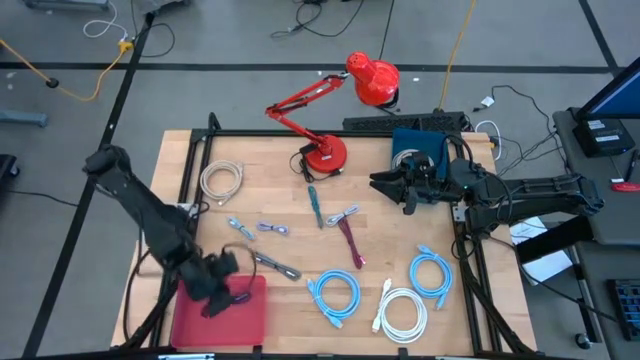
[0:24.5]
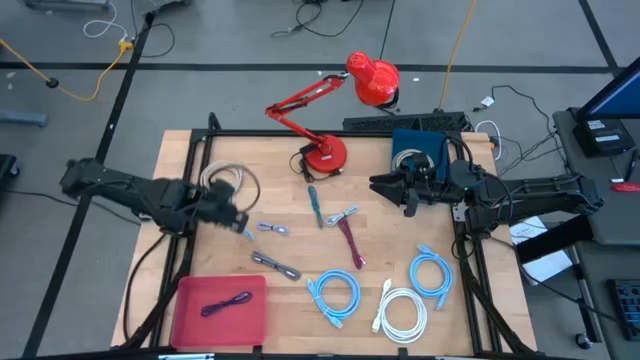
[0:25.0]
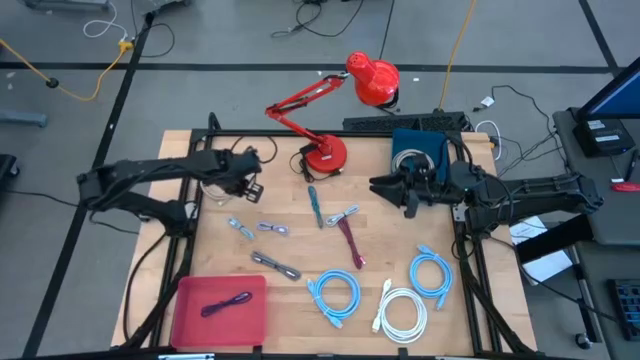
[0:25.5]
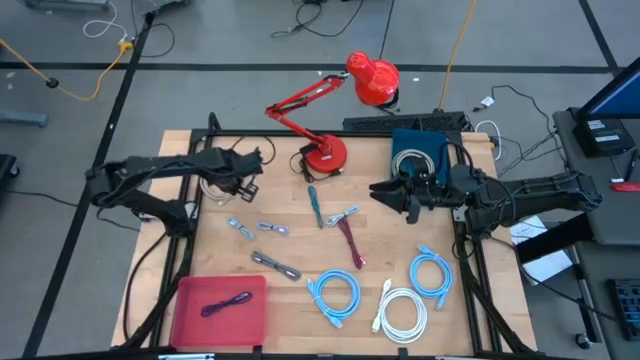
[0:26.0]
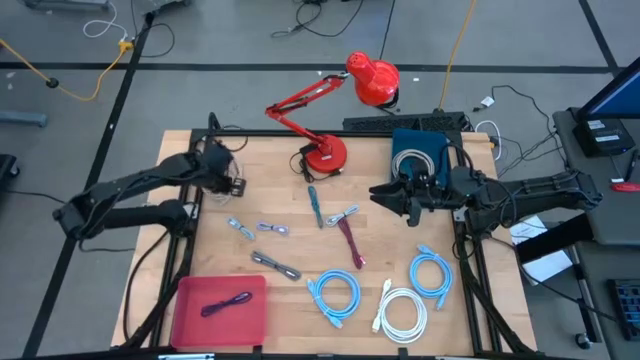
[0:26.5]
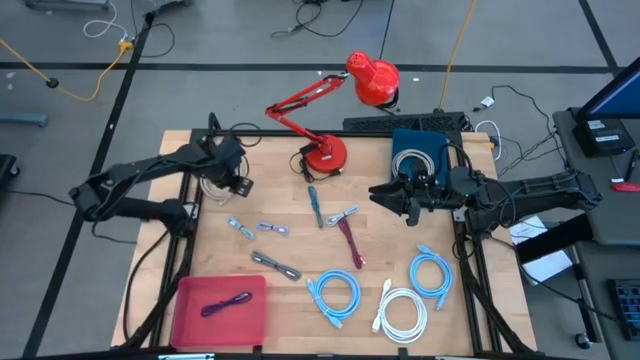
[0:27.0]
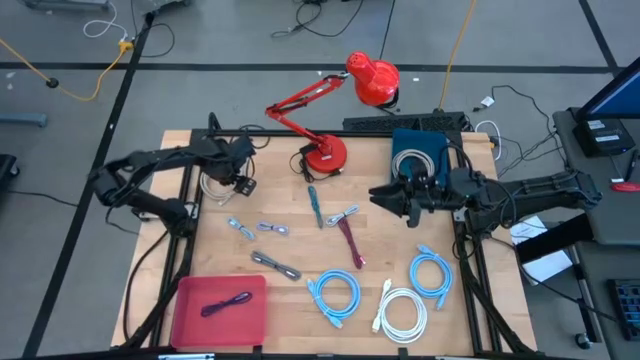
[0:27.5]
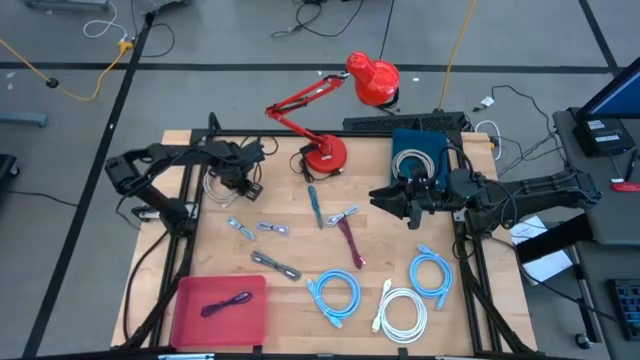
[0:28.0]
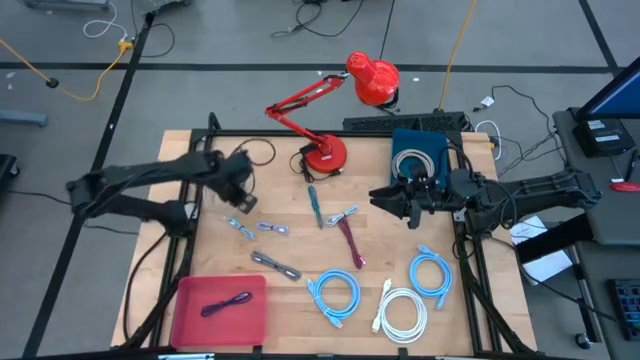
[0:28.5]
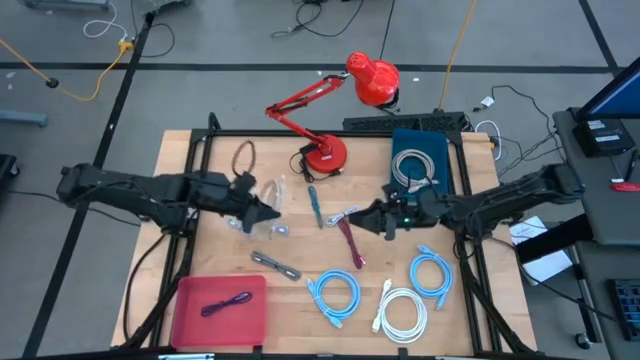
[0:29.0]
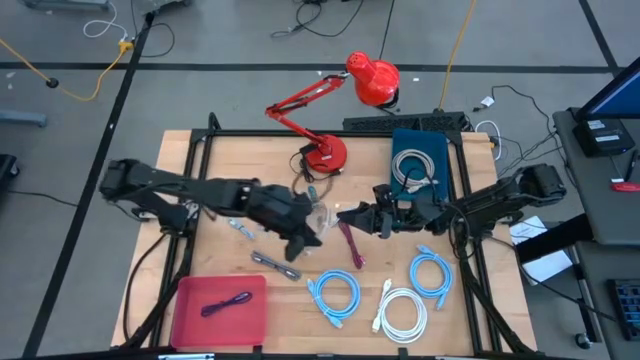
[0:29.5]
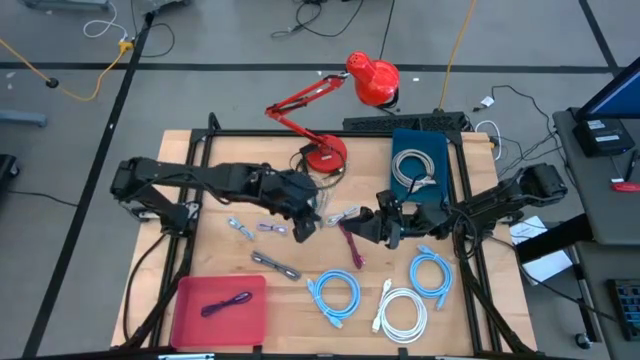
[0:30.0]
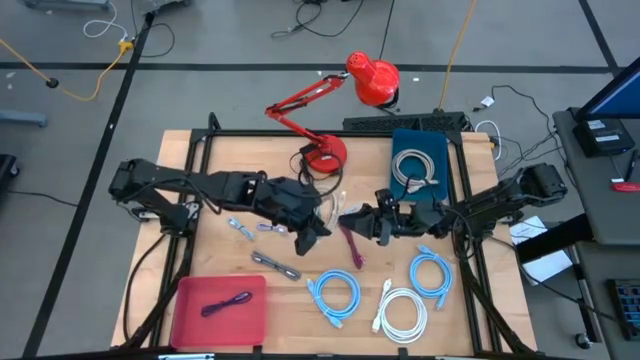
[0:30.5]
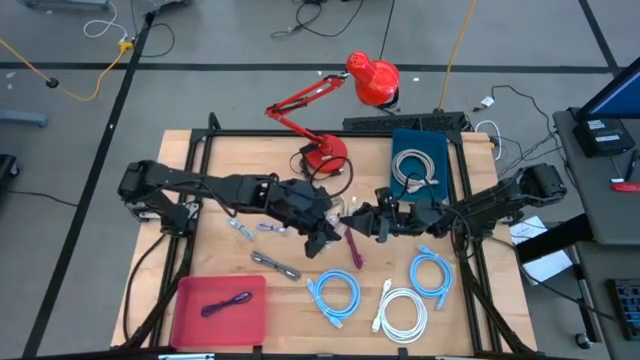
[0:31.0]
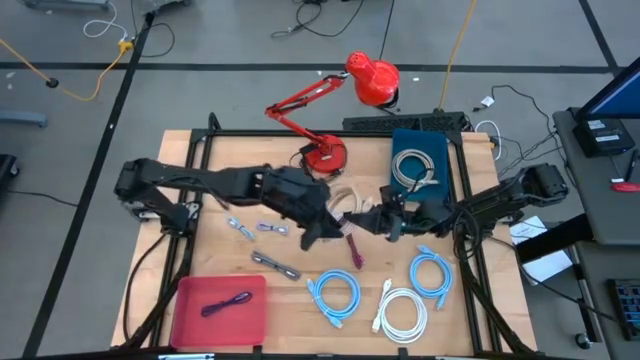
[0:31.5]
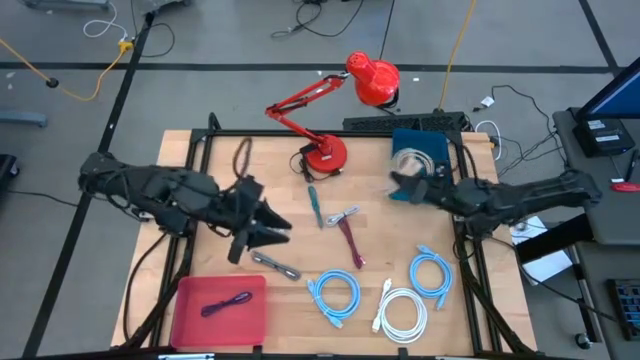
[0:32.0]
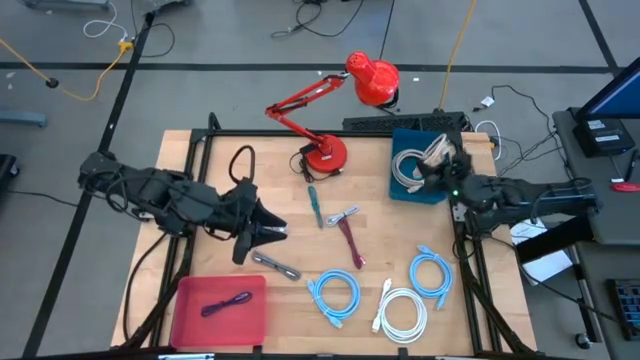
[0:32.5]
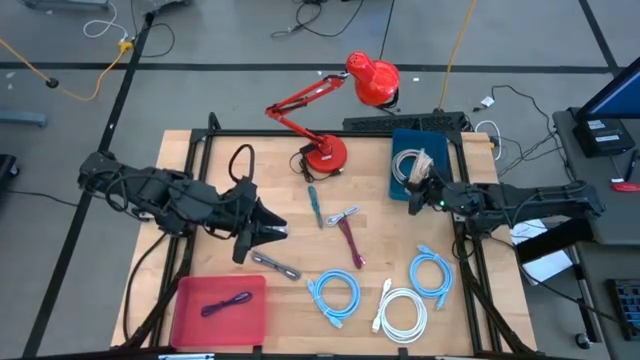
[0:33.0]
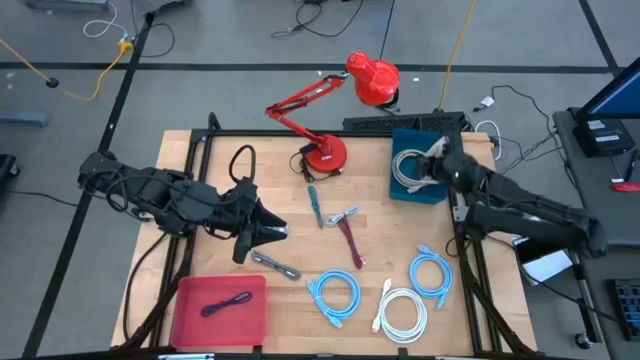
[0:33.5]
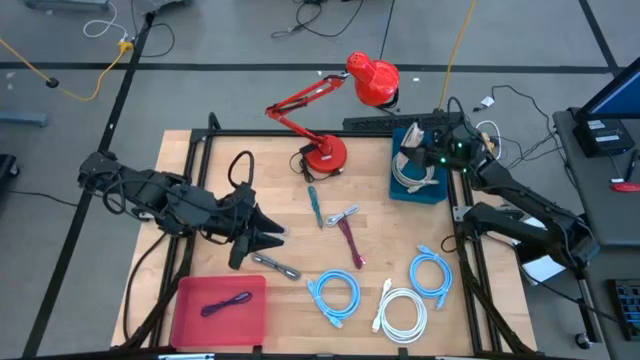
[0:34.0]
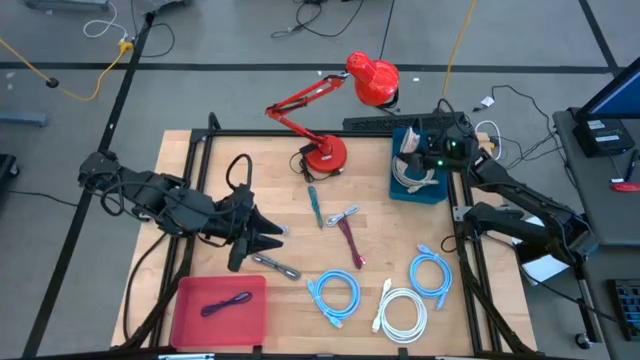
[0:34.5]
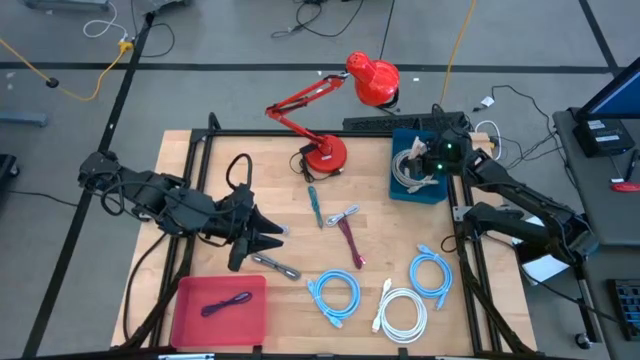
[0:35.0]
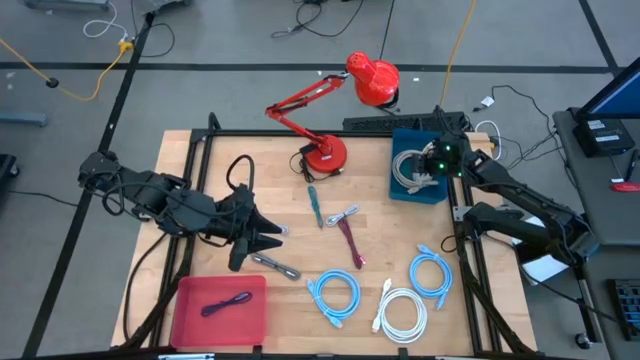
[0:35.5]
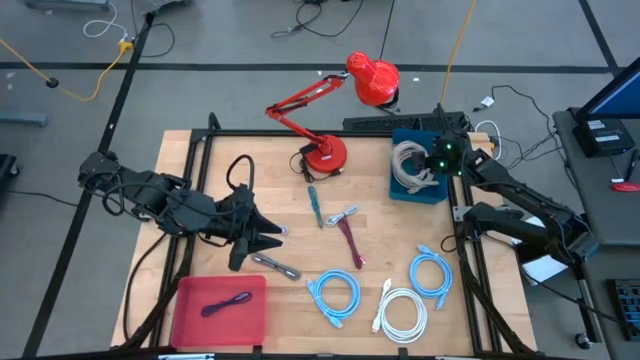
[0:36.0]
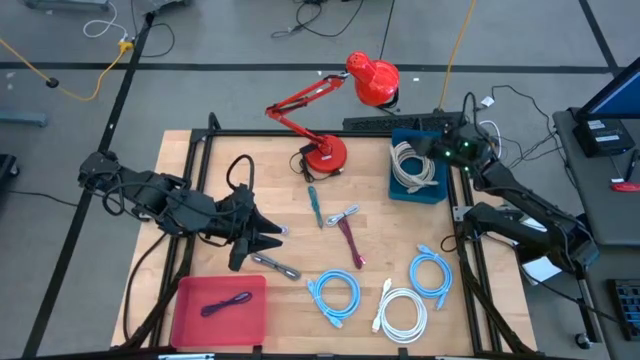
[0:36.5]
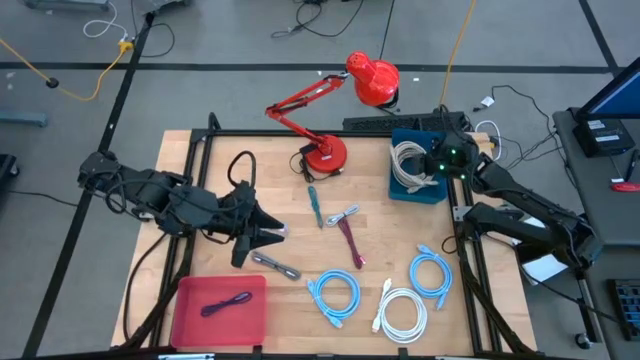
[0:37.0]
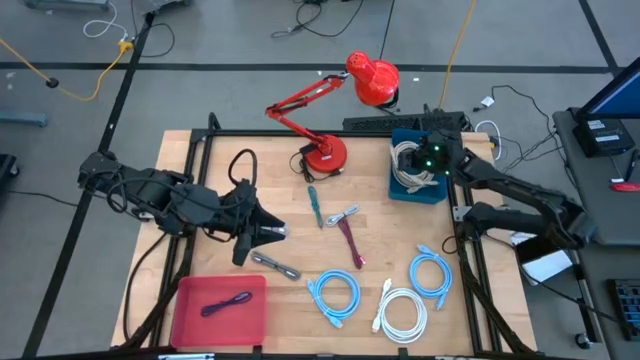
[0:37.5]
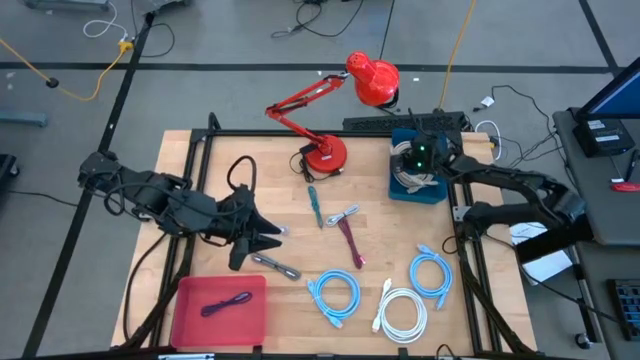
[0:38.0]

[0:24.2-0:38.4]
Task: Sort cables
Put the gray internet cable into the blue bin

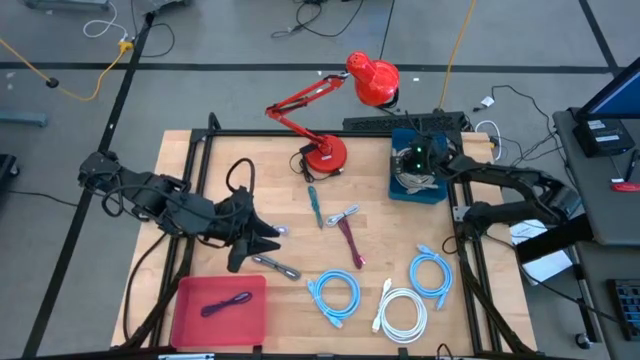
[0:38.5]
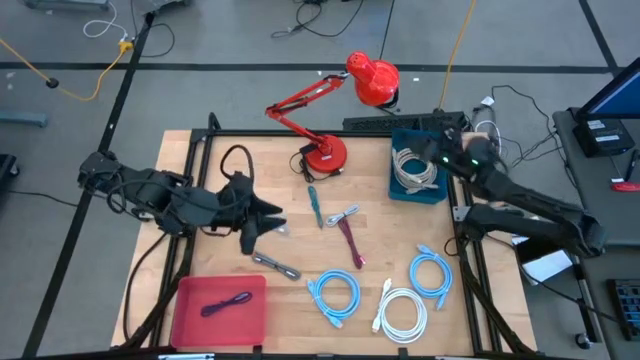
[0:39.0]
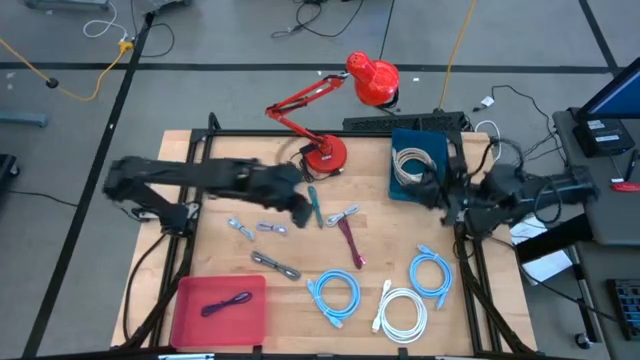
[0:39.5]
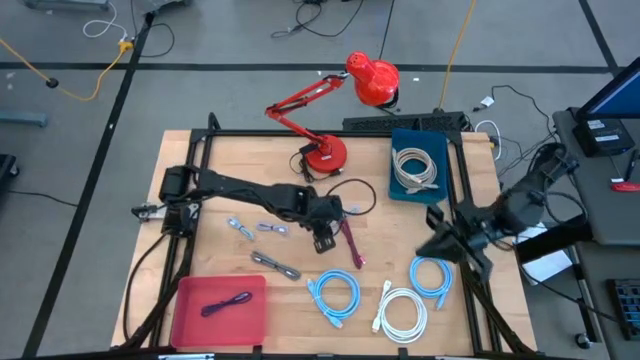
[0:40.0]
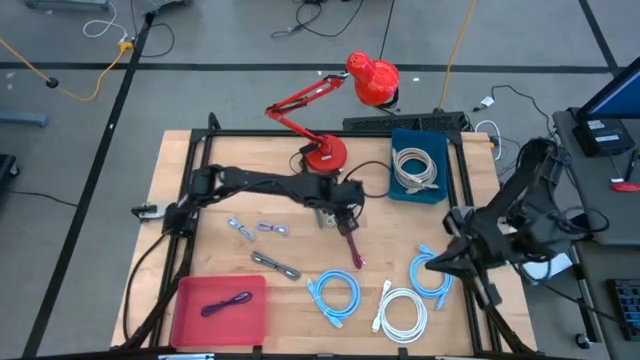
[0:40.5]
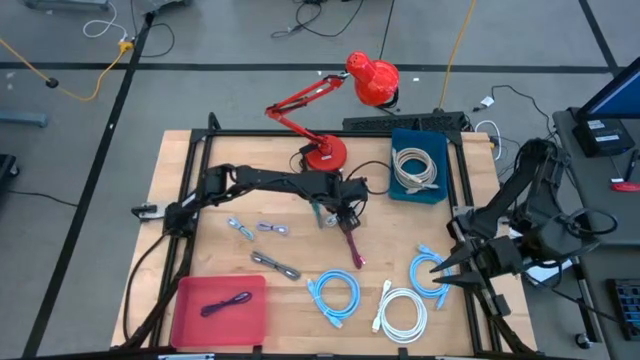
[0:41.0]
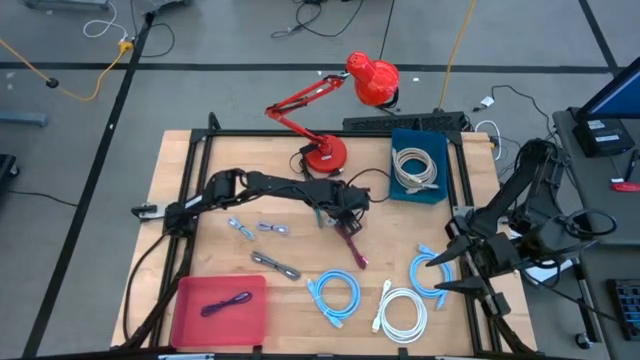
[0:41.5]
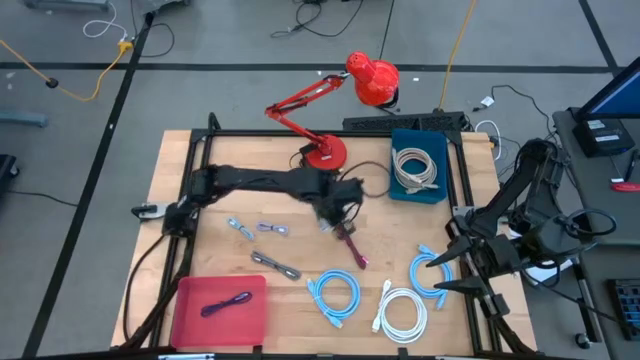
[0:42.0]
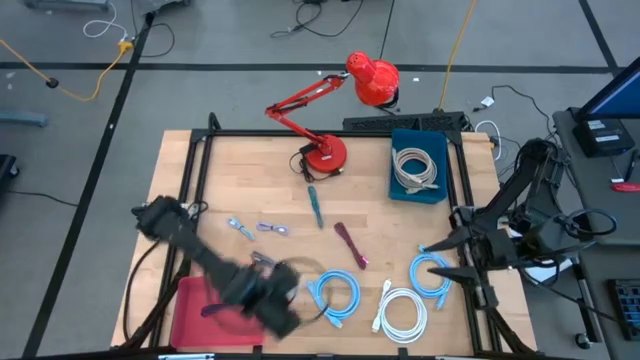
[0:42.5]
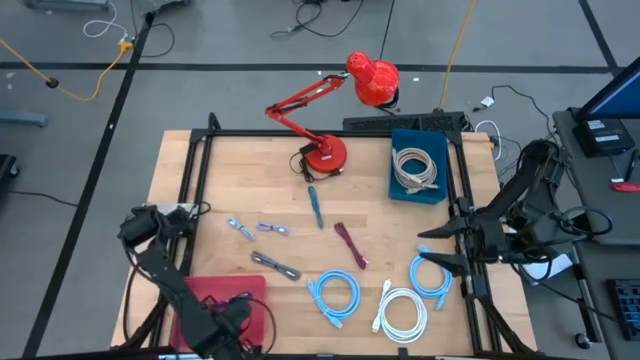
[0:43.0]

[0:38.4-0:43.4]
Put the white charger cable into the pink bin

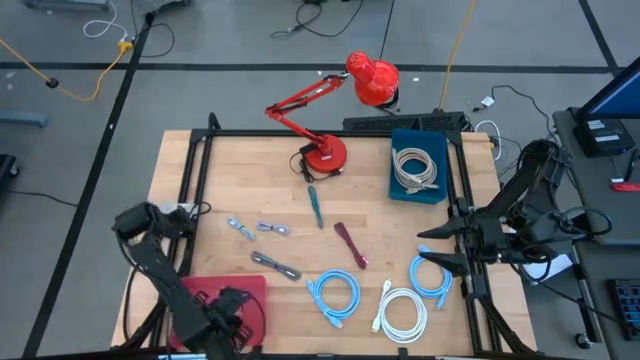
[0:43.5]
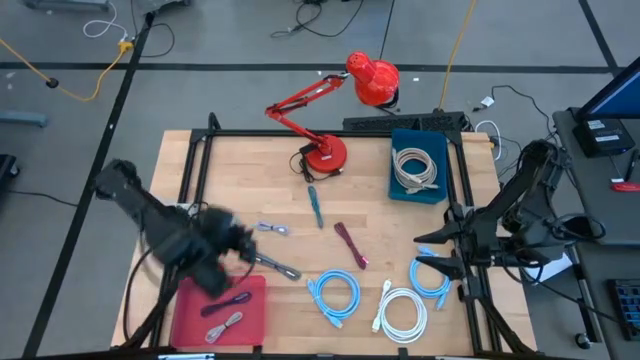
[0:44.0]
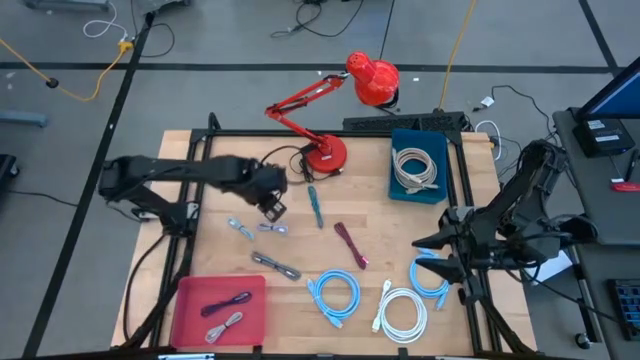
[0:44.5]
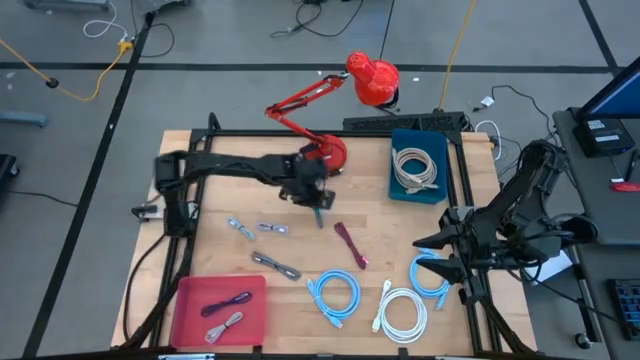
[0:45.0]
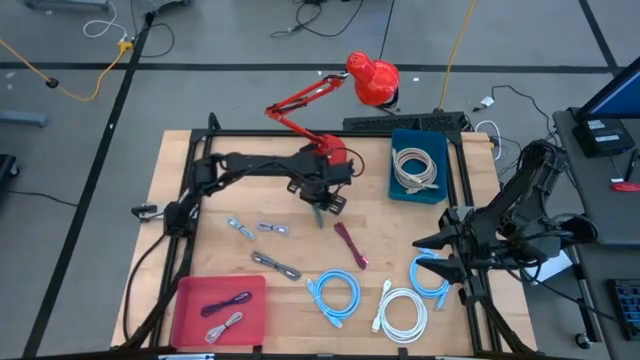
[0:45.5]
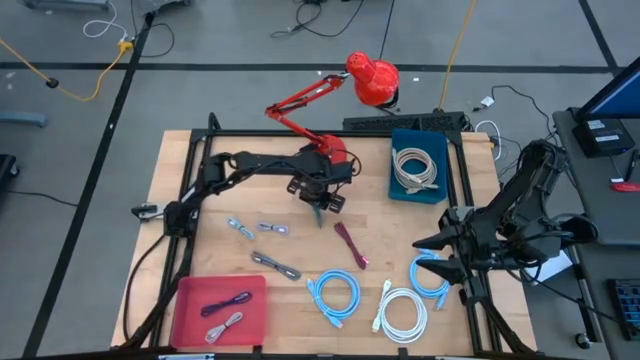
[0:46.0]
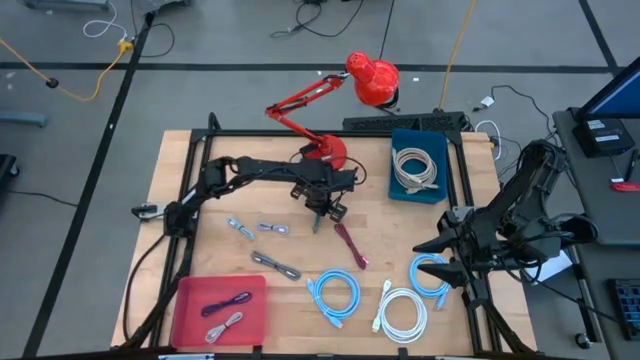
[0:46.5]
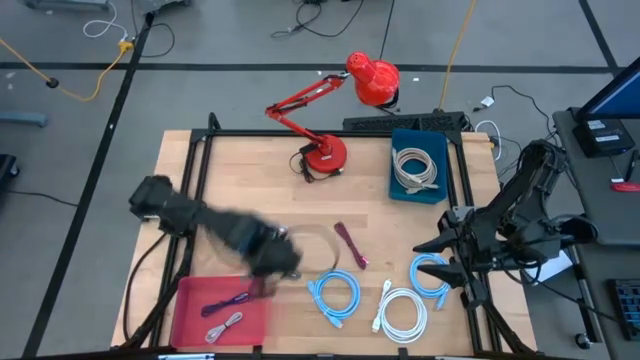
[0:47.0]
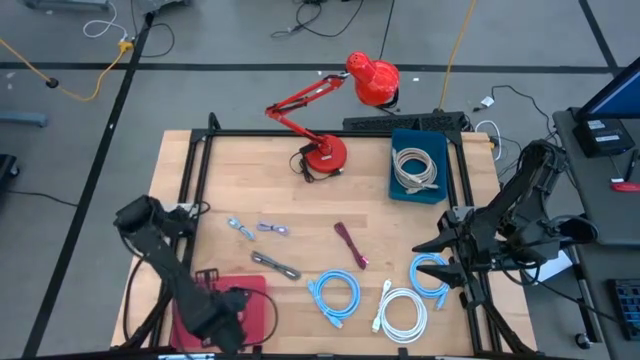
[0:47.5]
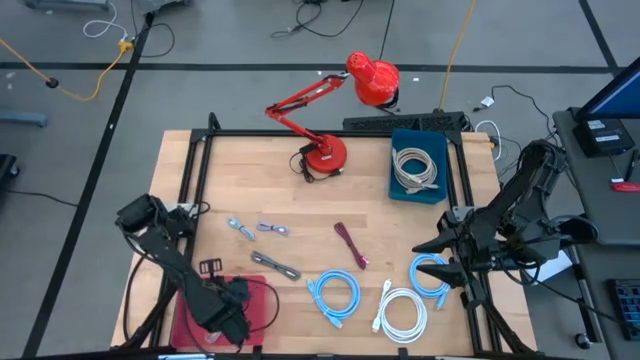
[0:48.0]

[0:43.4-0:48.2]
Put the blue charger cable into the pink bin
